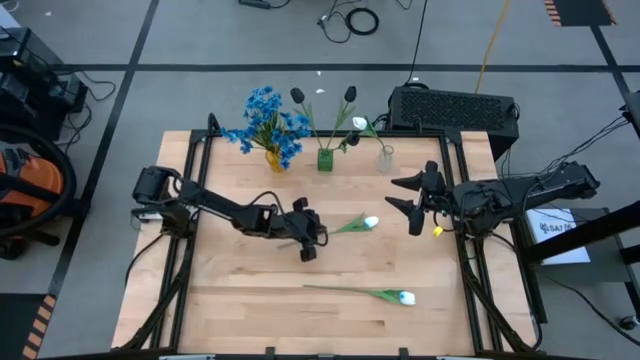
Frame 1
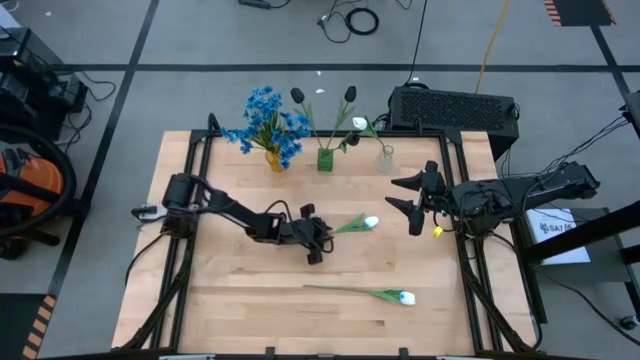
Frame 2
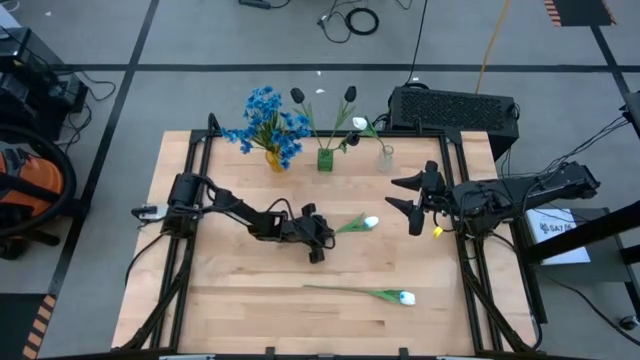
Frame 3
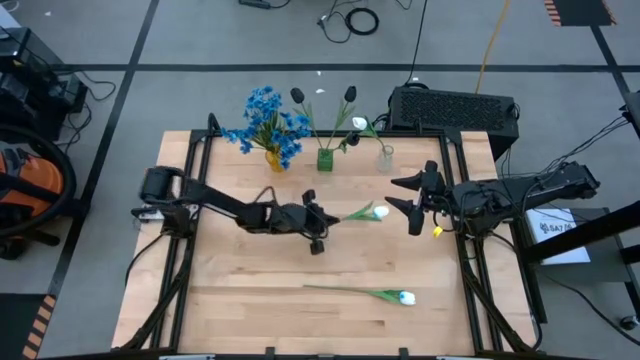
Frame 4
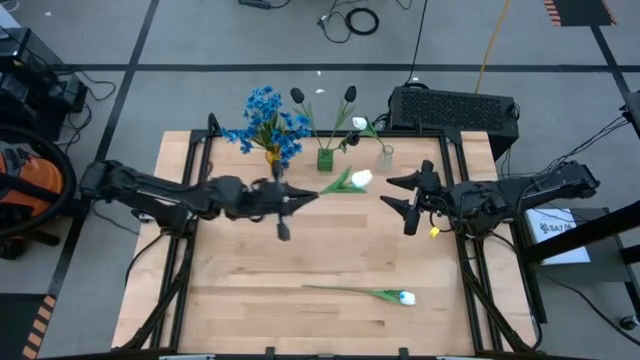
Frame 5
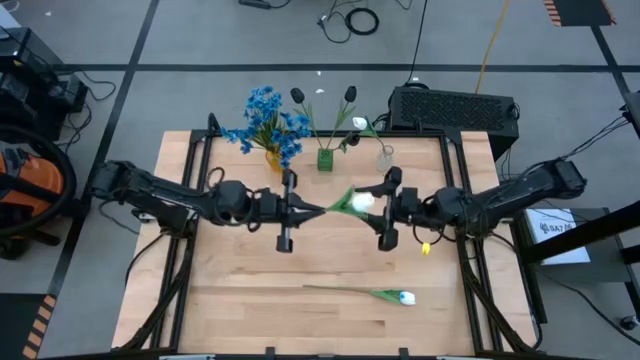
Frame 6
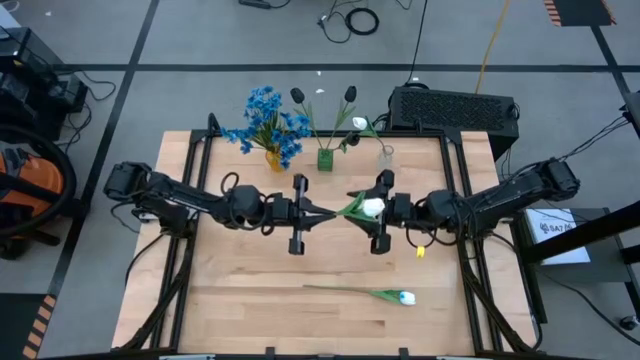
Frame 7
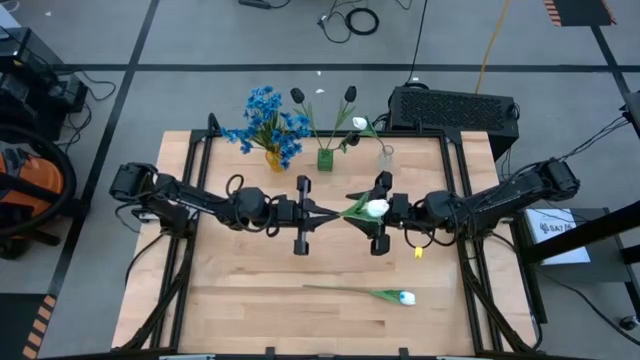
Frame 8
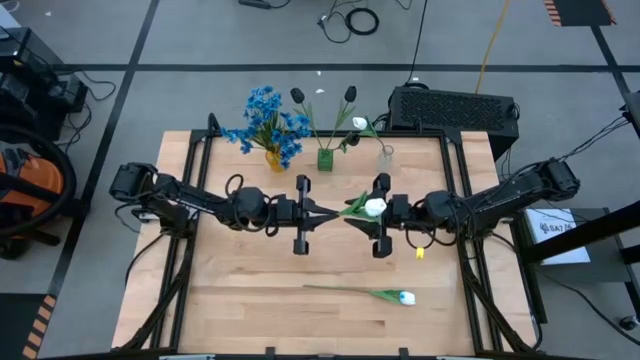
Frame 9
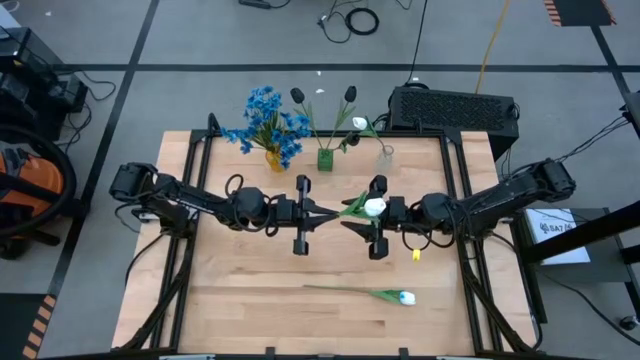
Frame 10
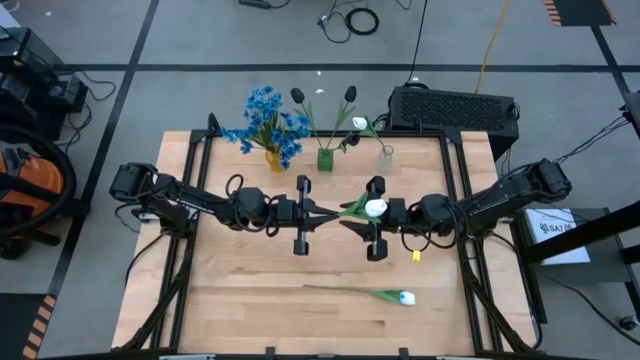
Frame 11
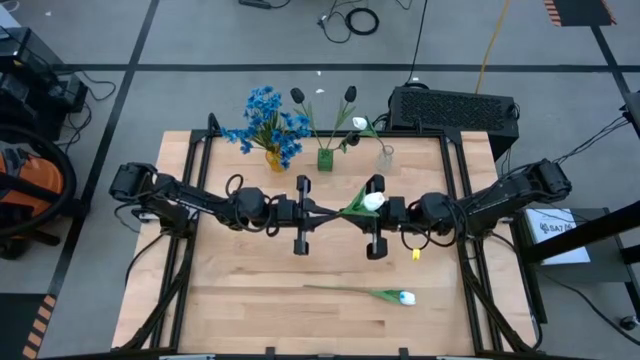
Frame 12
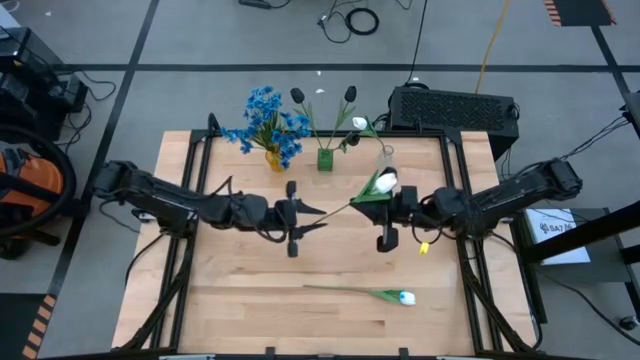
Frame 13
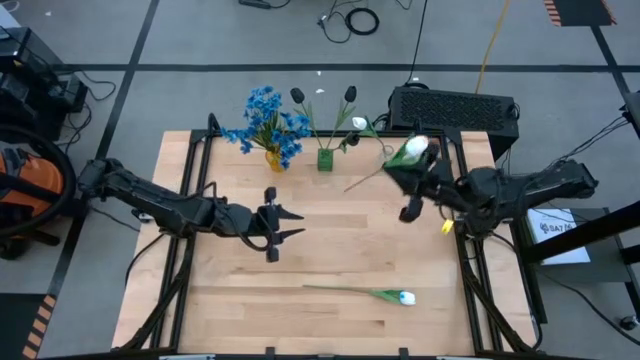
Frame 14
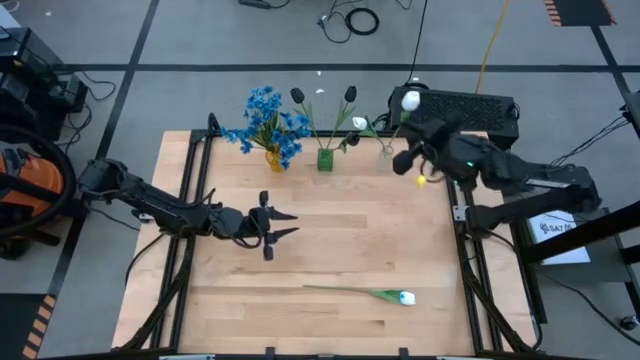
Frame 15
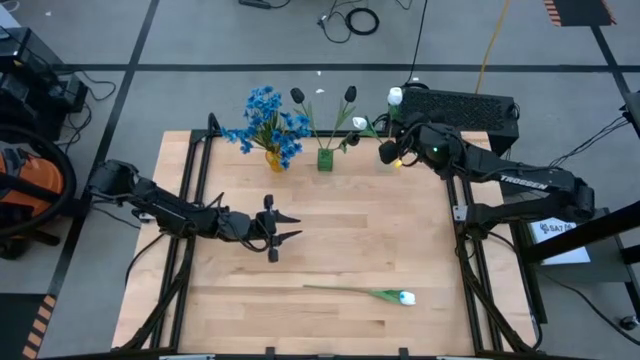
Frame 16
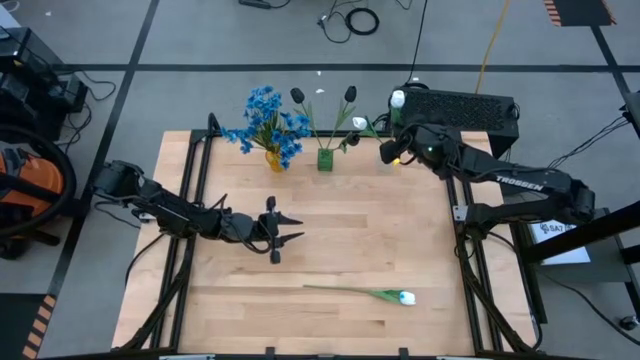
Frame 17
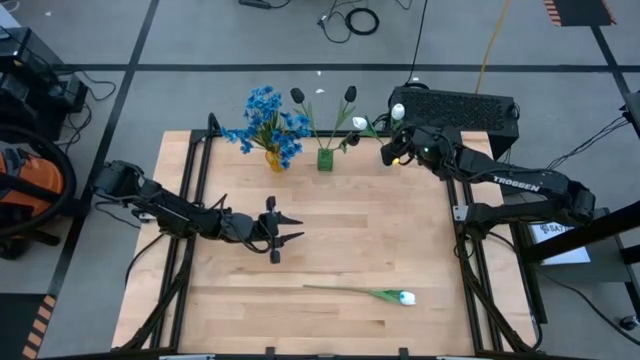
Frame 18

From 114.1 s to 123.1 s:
Task: Sort flowers into vase by color
Put the top white tulip into the transparent vase

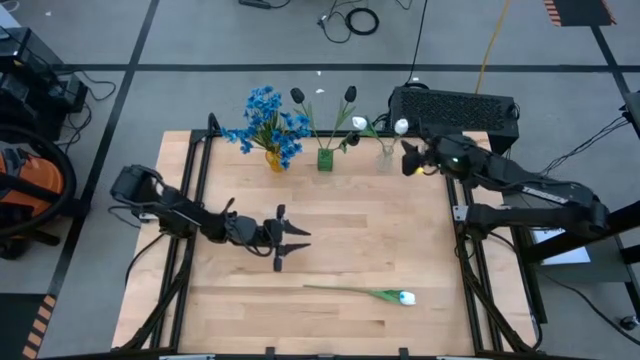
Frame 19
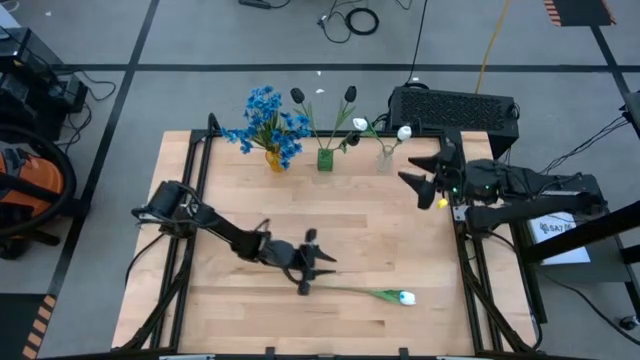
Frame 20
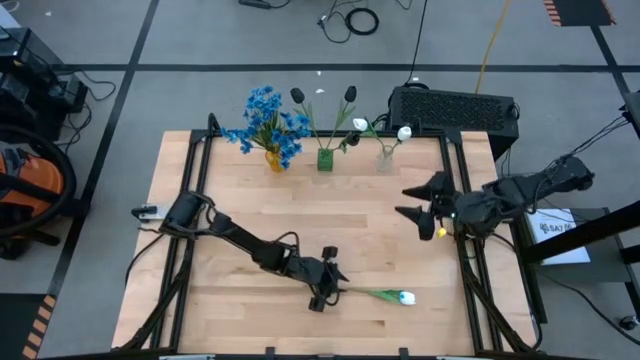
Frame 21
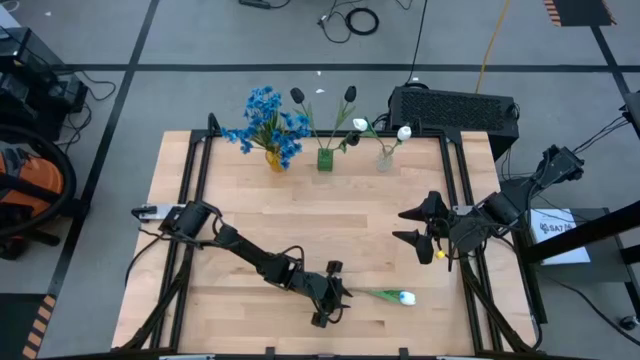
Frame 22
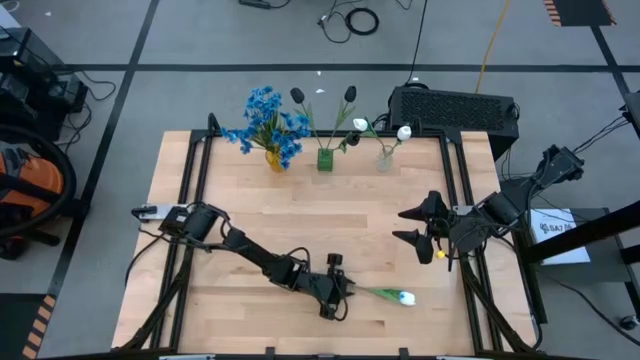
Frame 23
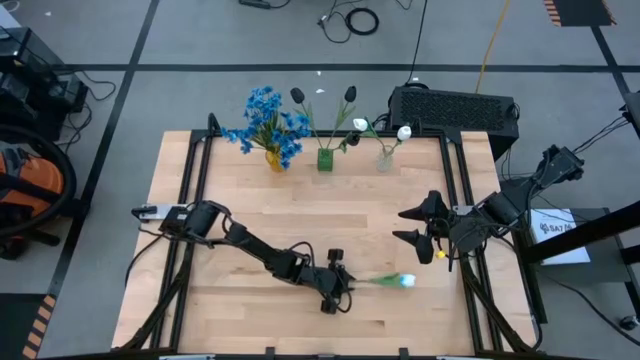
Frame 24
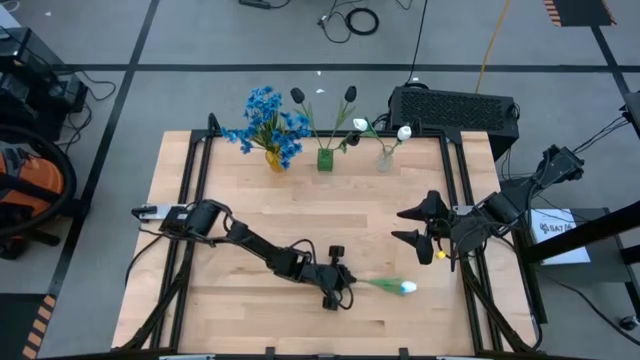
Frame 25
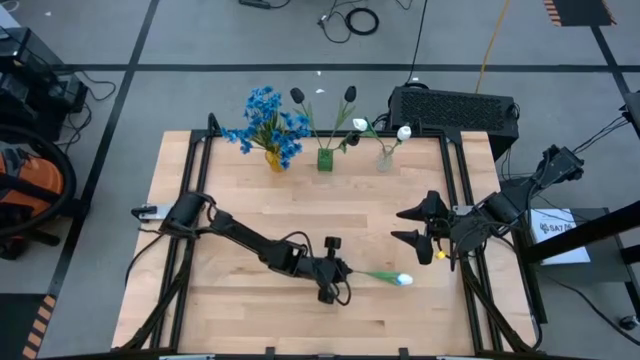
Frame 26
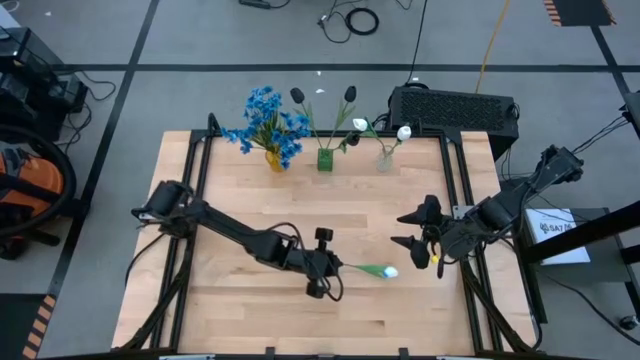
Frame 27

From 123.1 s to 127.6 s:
Put the white tulip into the transparent vase

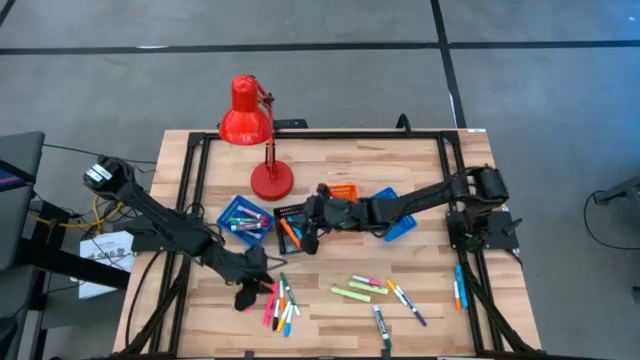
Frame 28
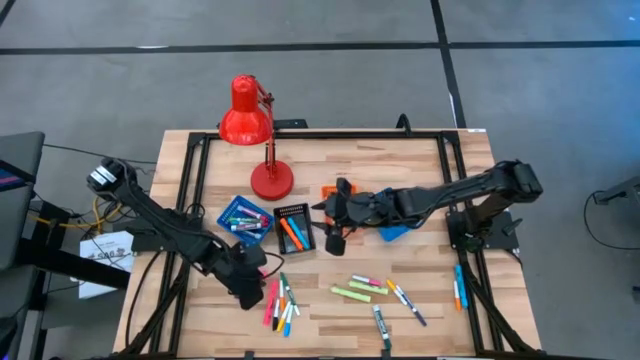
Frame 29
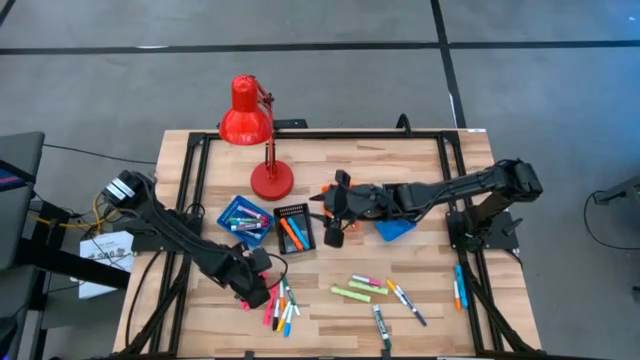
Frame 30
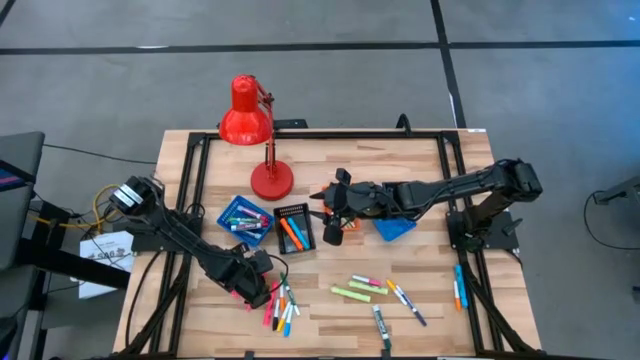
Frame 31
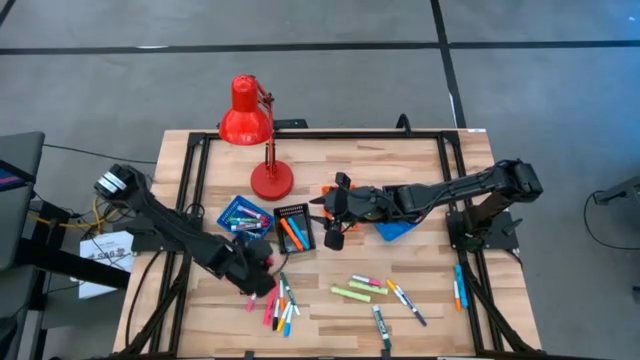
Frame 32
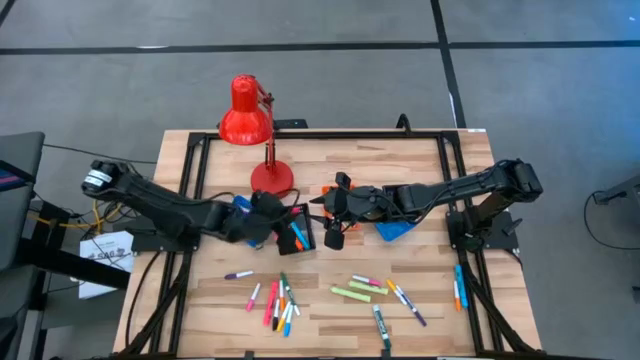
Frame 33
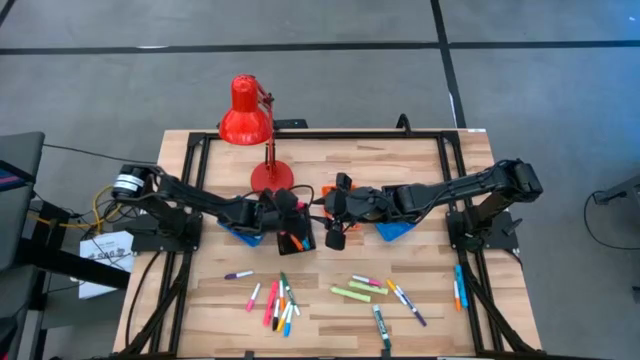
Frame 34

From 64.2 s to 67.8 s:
Task: Pick & Place Markers
Put the left large pink highlighter pen into the black basket

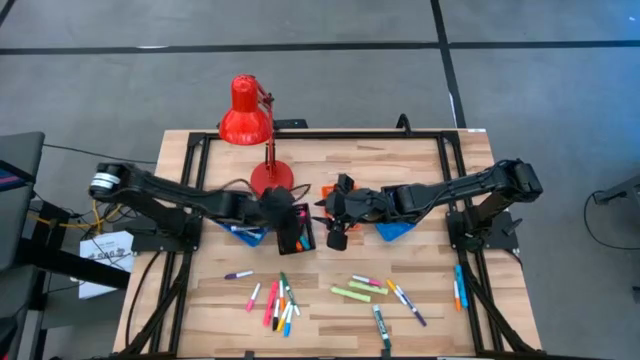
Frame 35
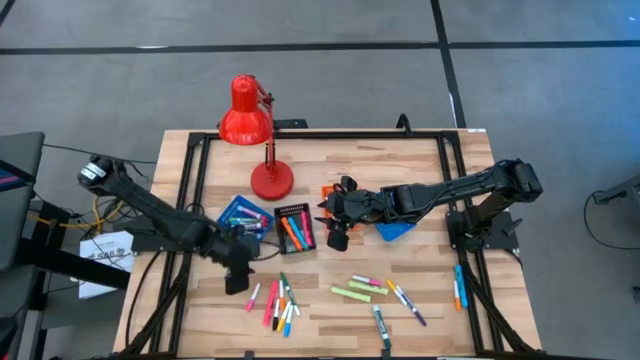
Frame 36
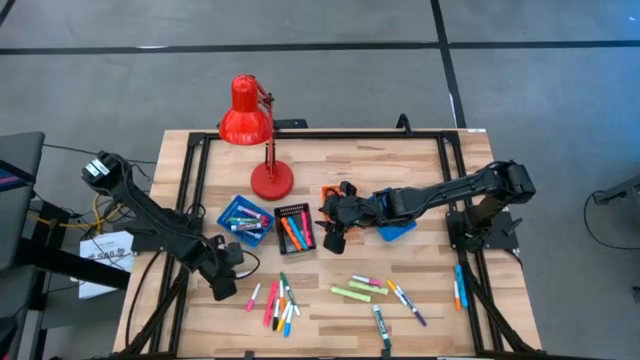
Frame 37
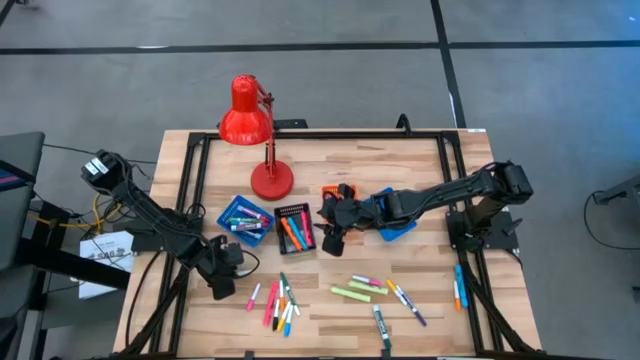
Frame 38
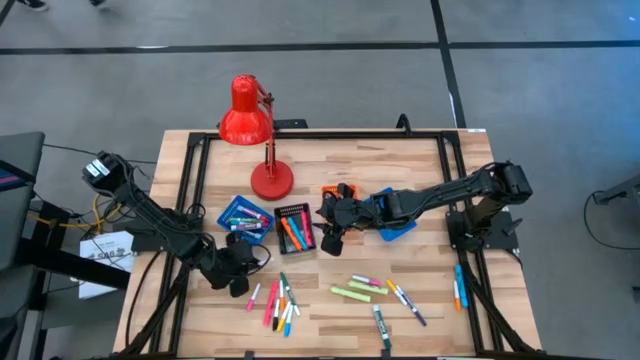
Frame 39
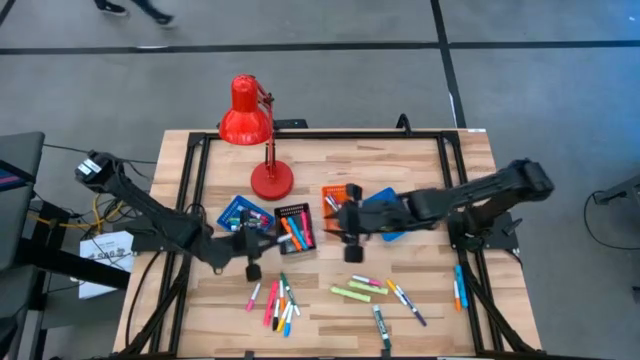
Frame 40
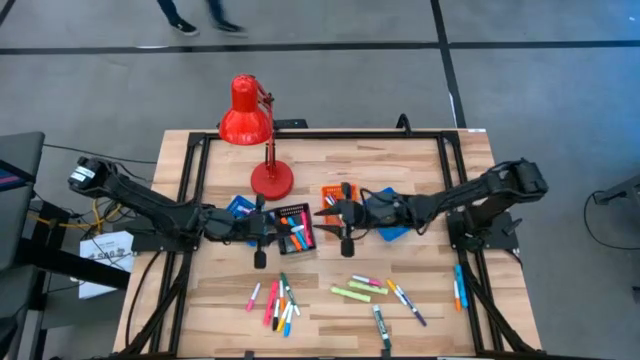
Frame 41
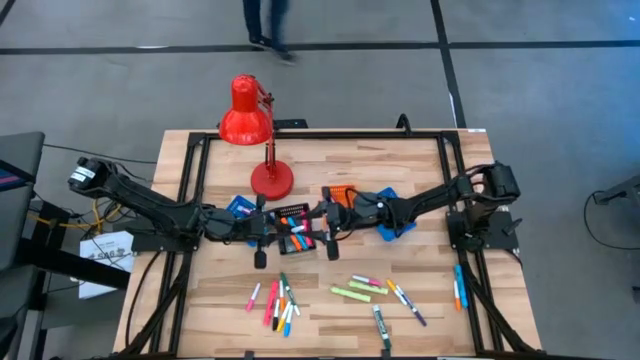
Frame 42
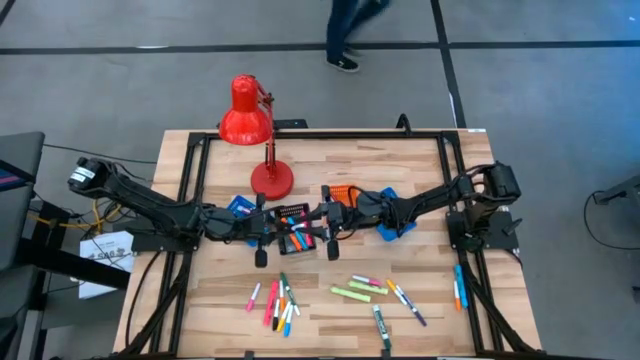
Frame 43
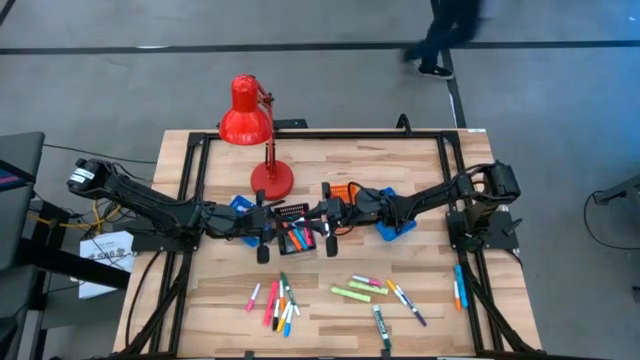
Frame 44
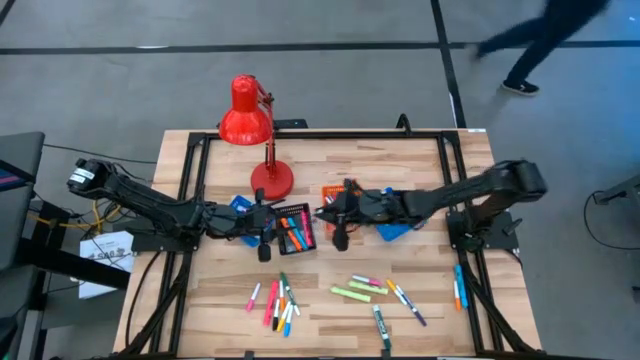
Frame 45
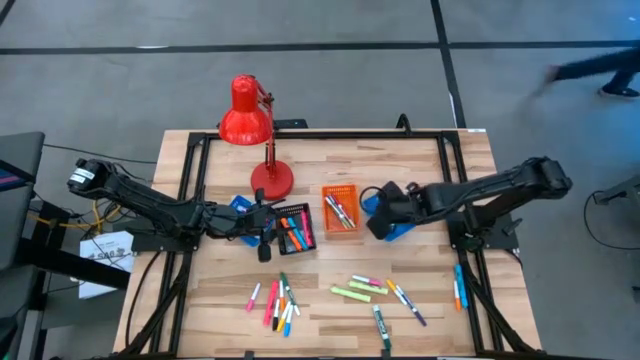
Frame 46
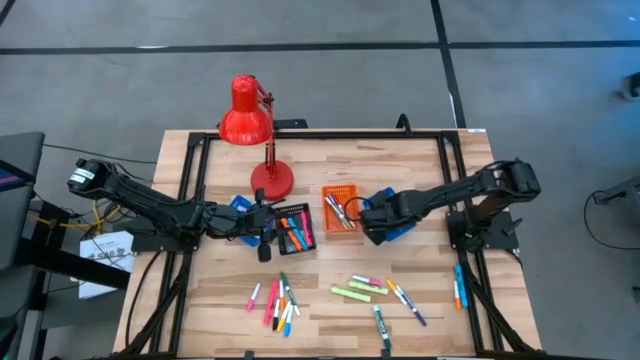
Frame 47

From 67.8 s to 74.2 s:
Put the small white and purple highlighter pen into the right blue basket
